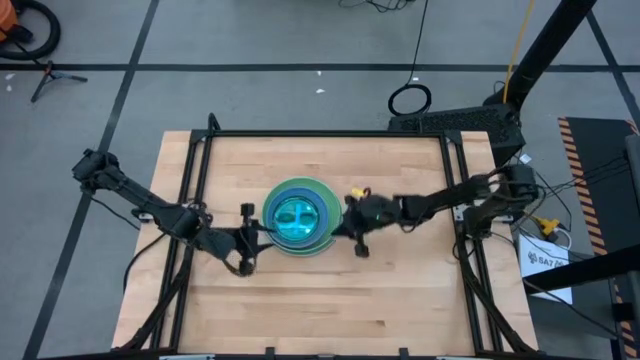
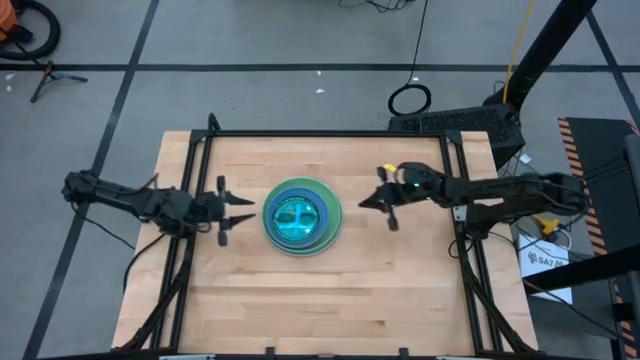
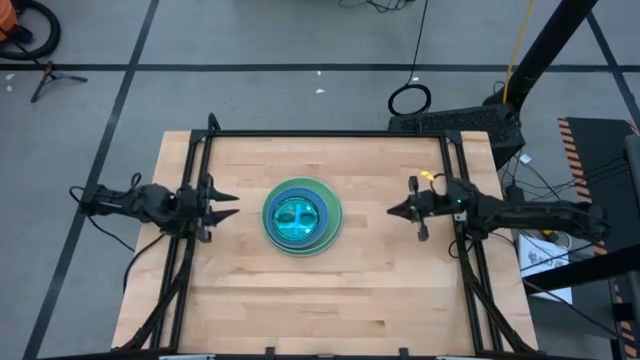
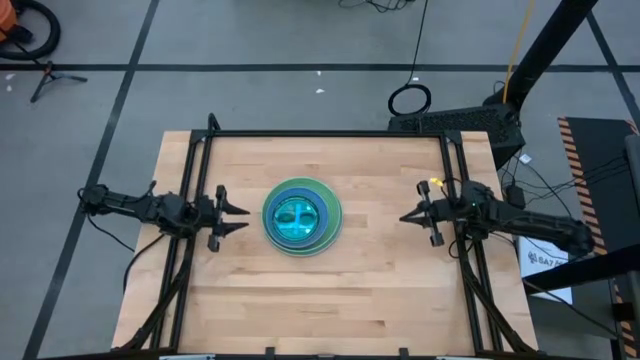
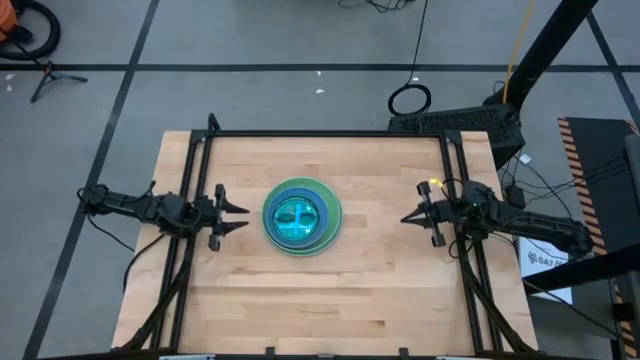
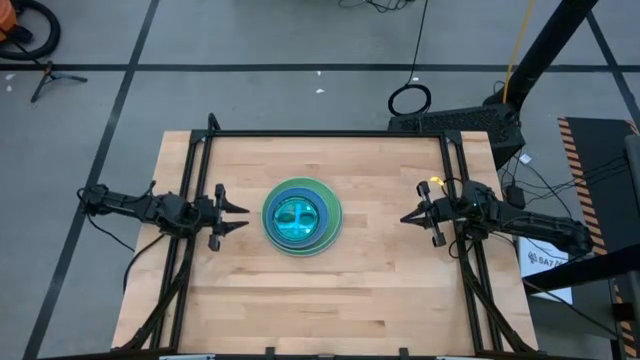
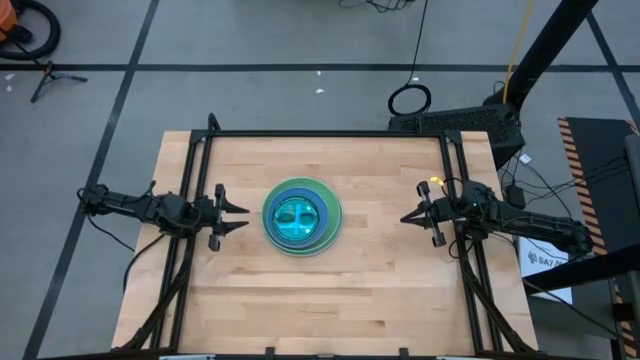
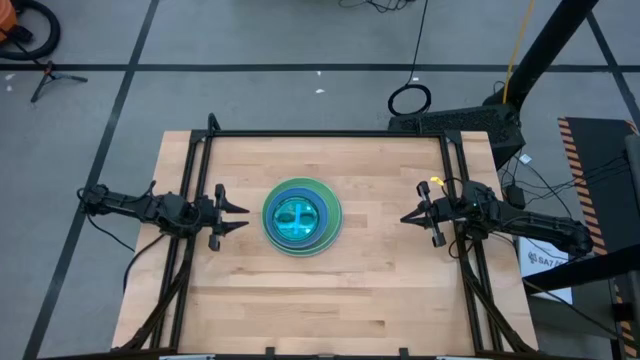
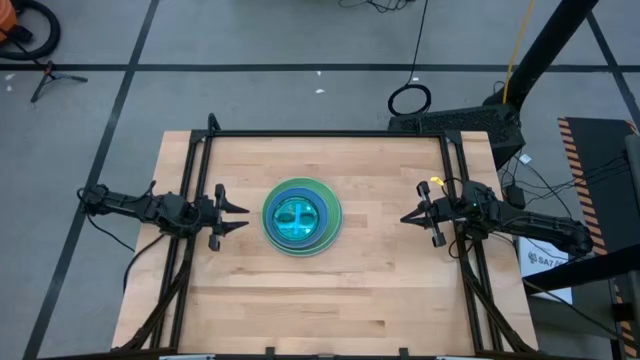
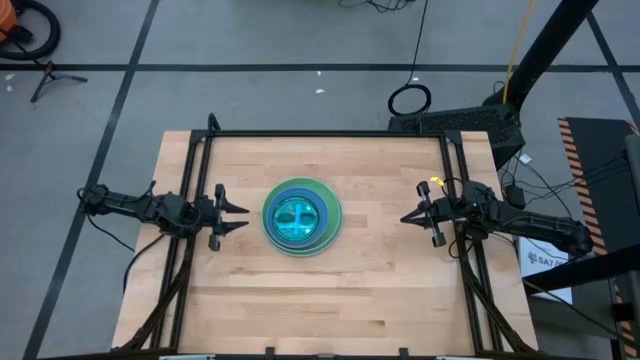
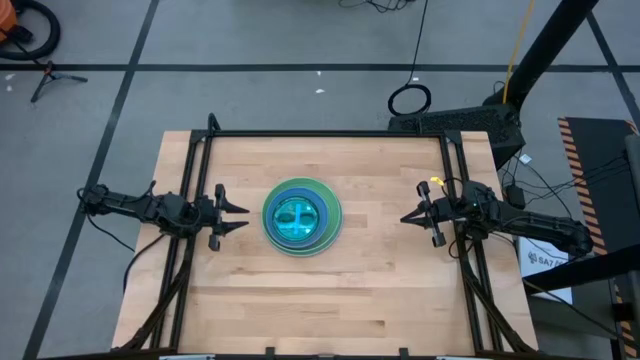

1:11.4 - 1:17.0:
Task: Stack plastic plates
Return to Home Position

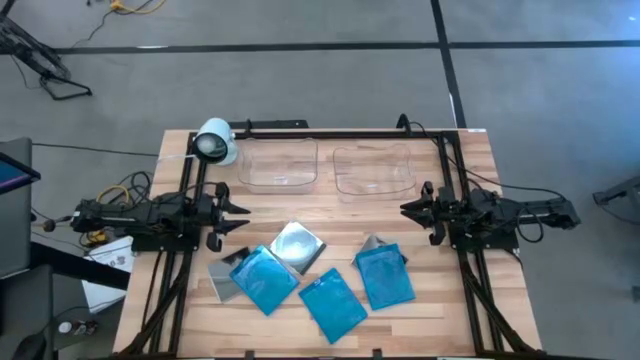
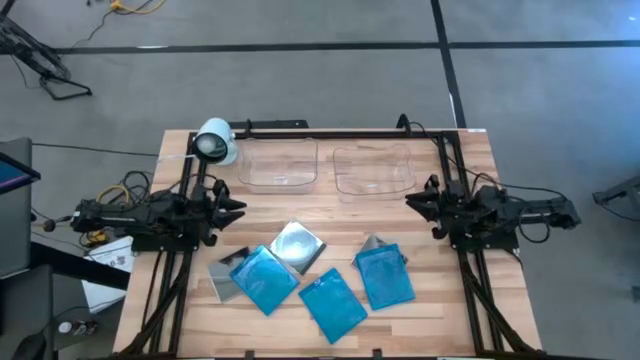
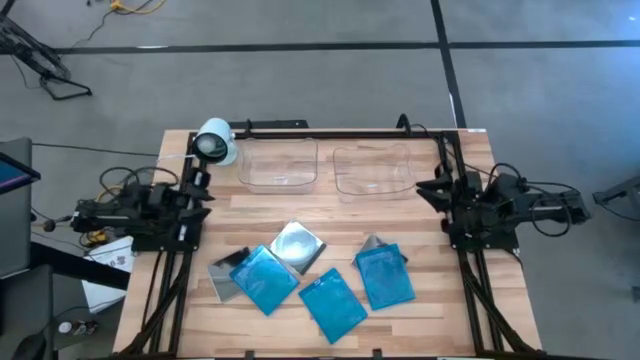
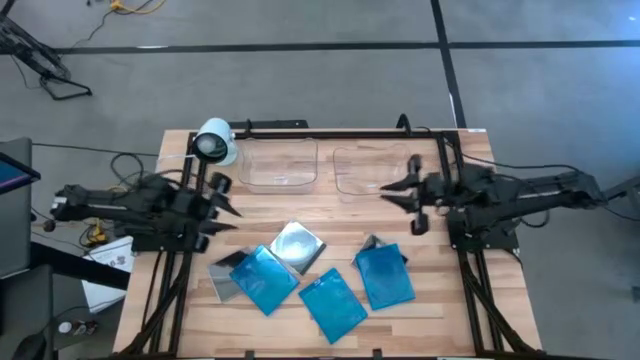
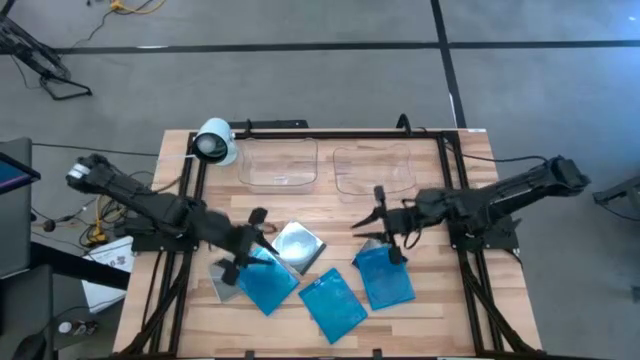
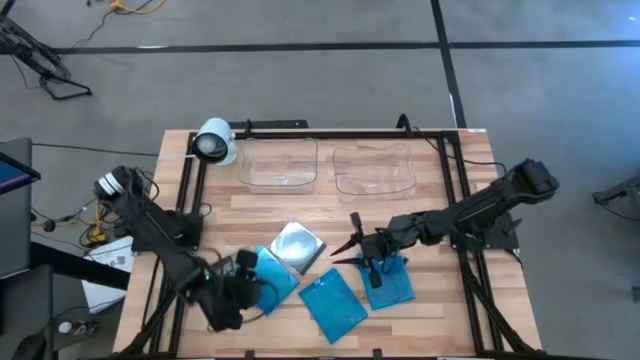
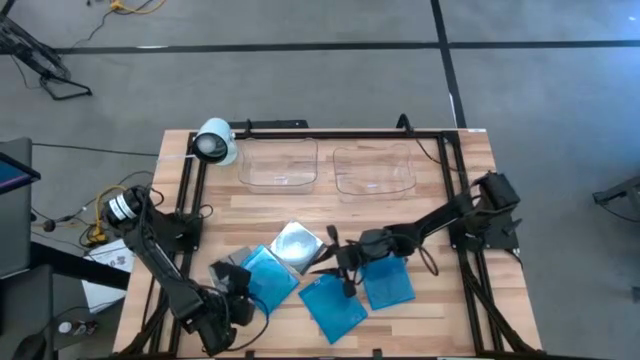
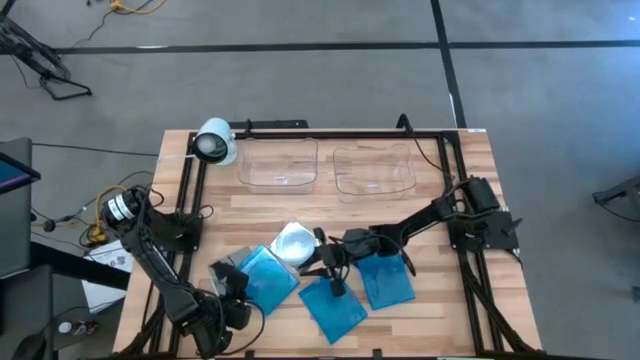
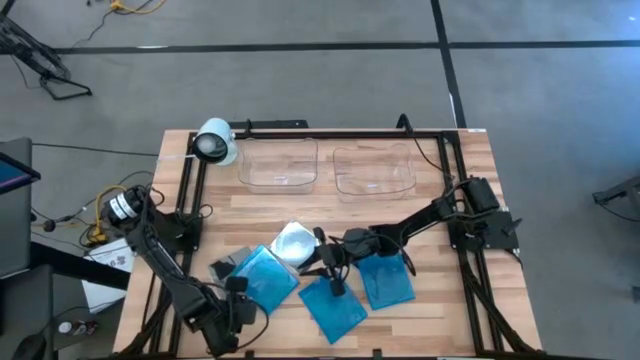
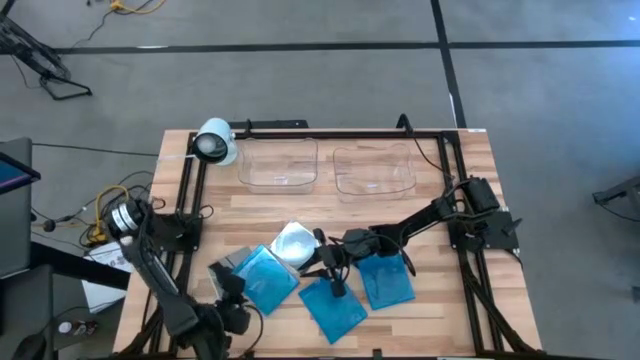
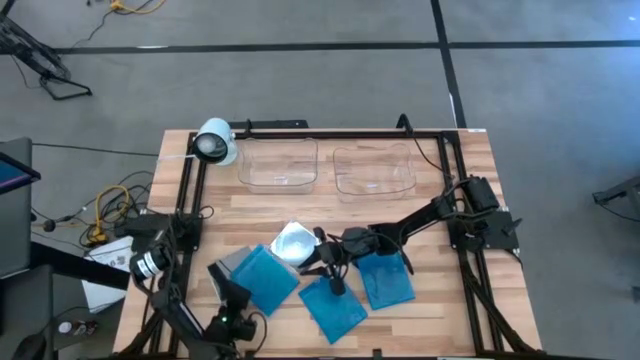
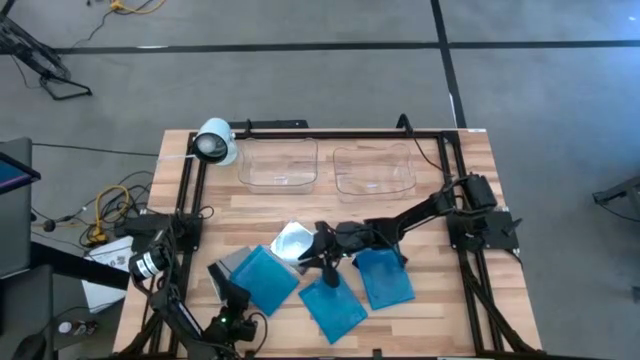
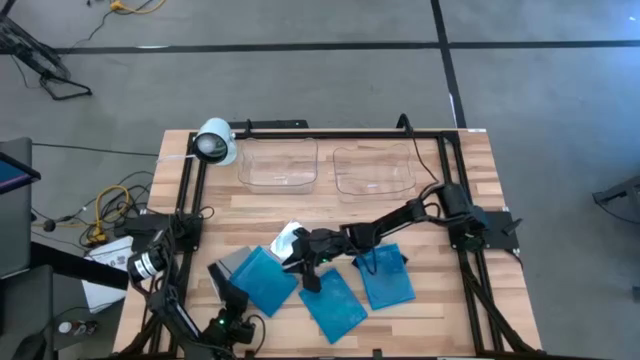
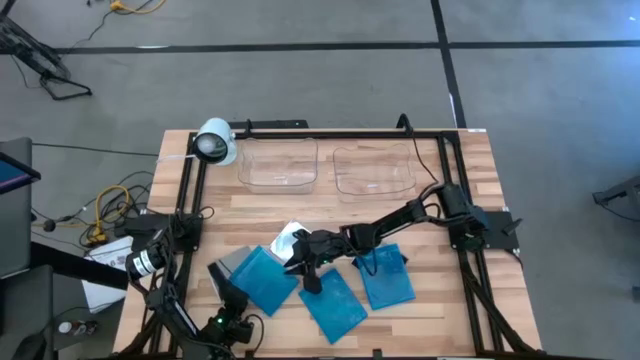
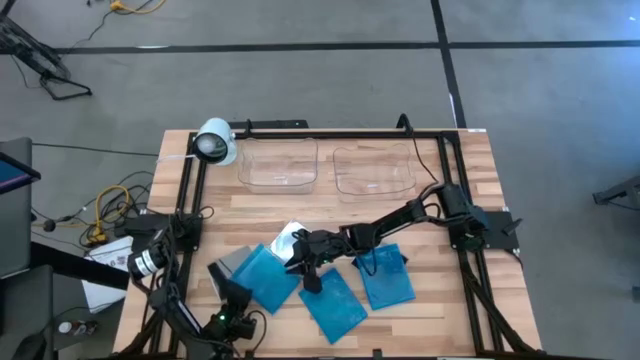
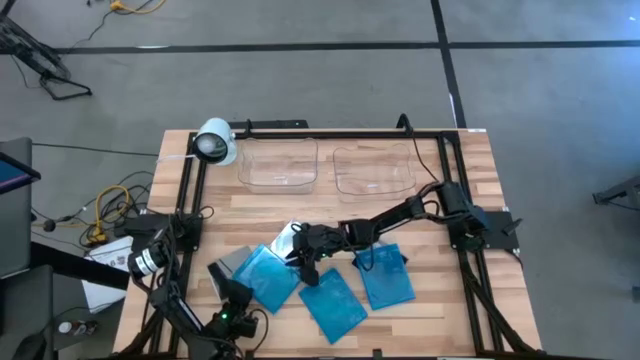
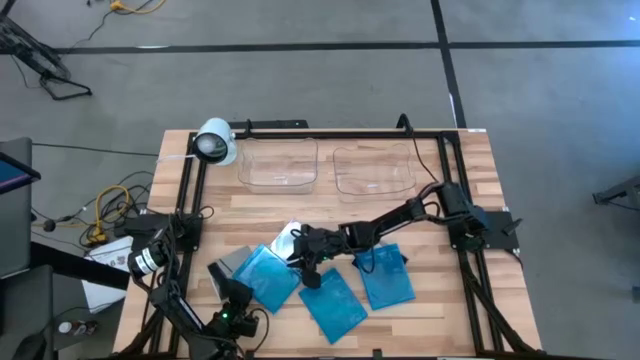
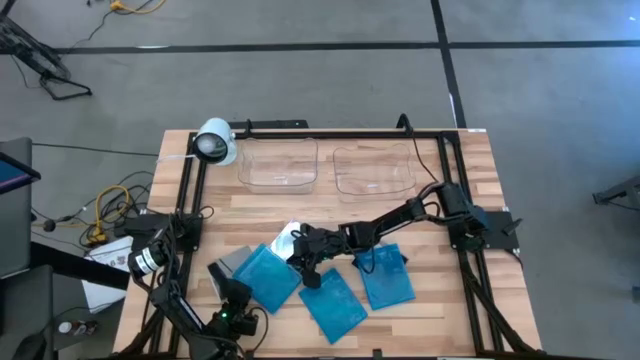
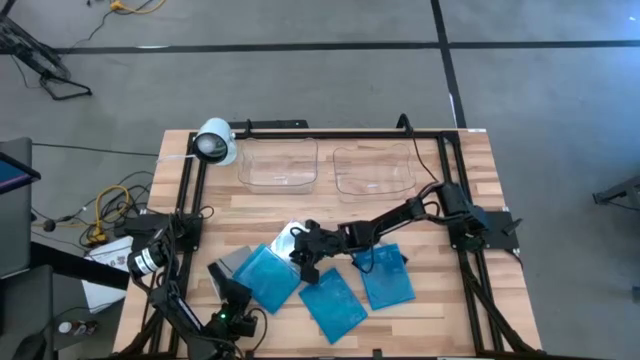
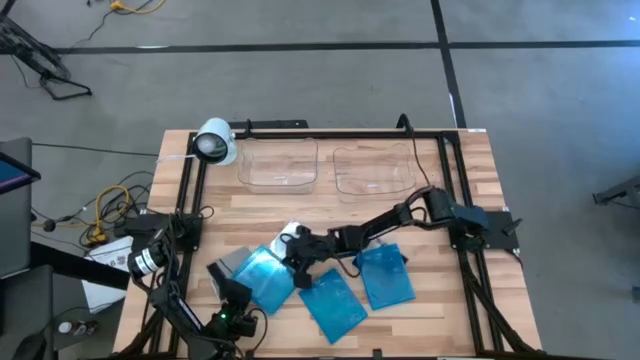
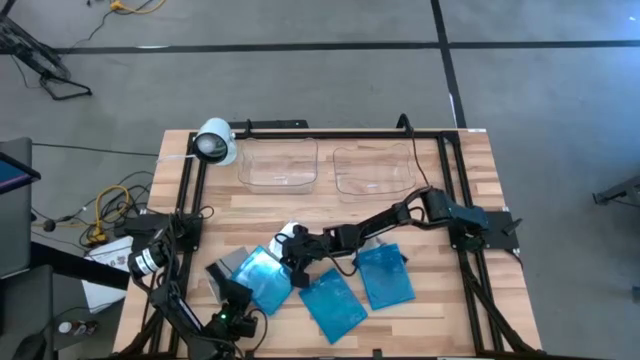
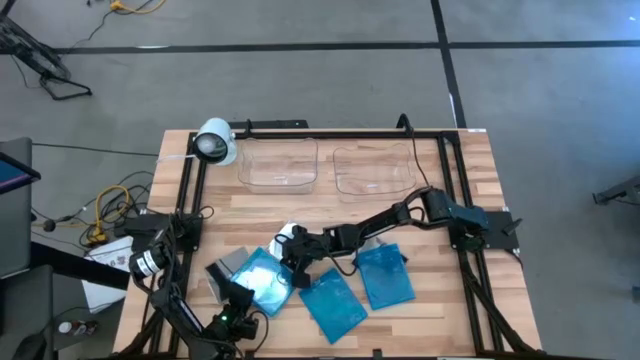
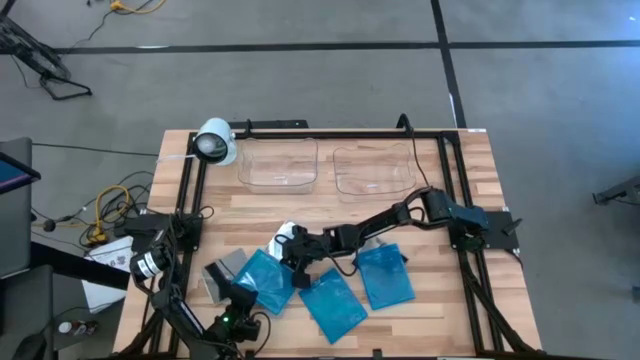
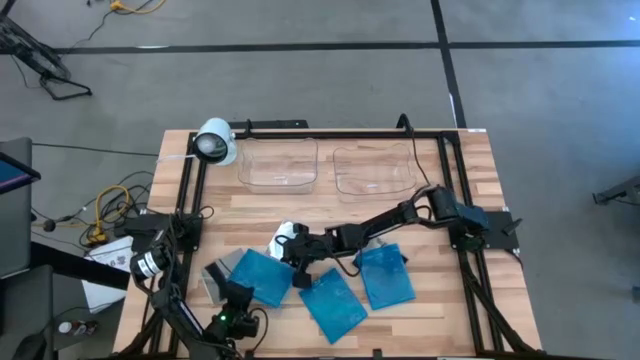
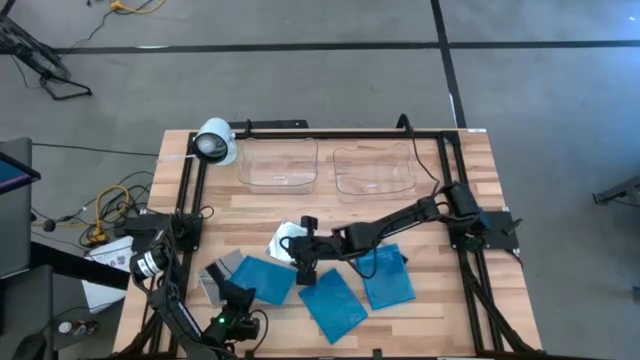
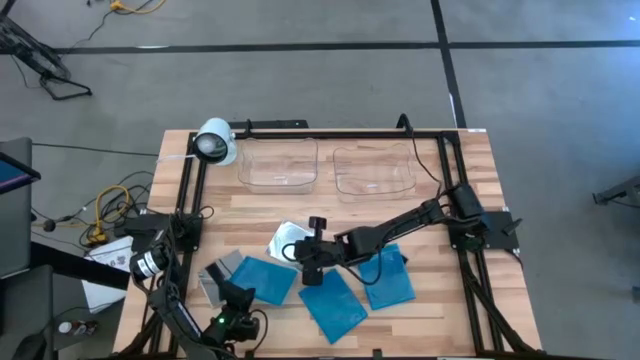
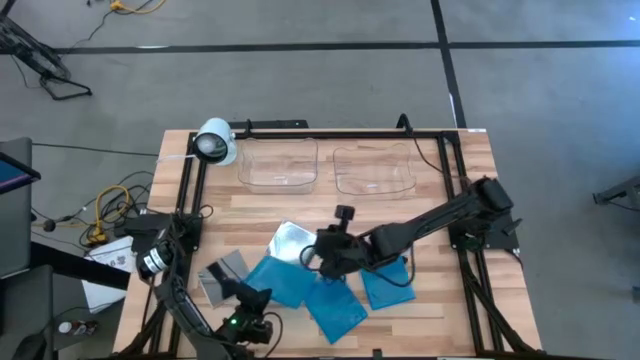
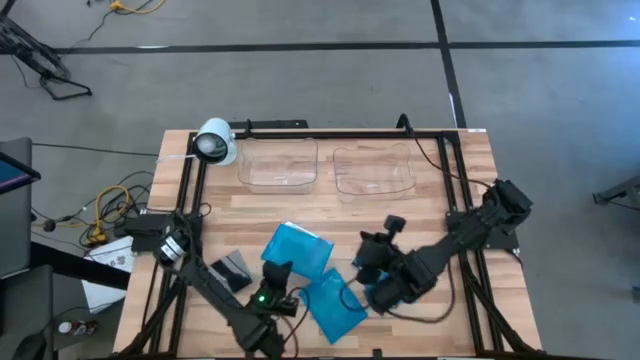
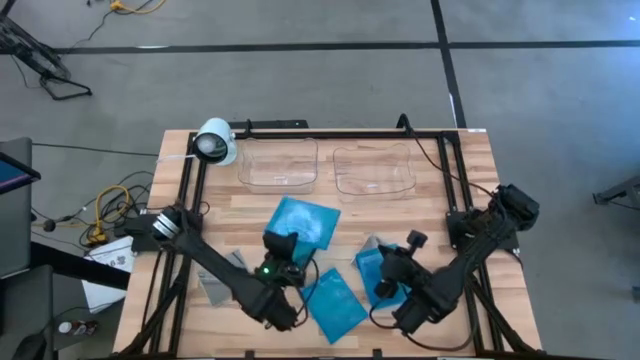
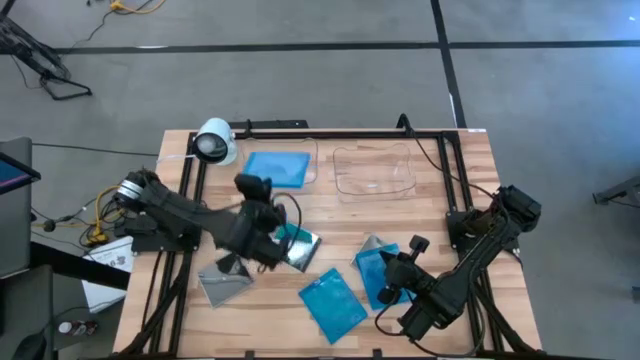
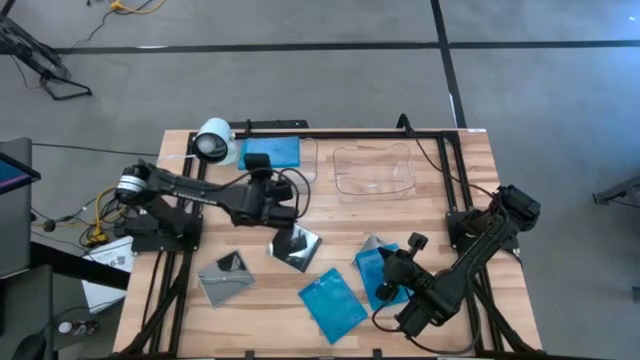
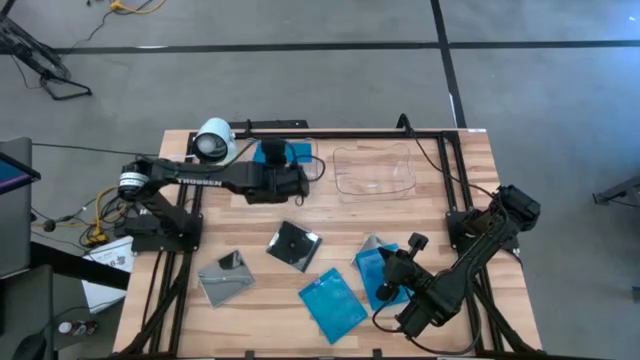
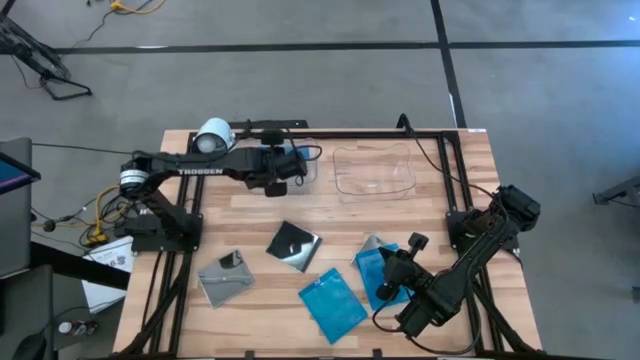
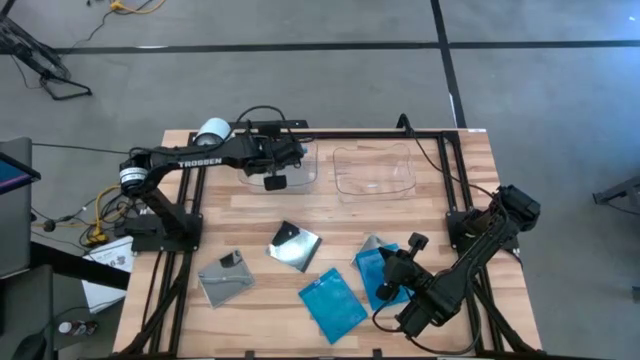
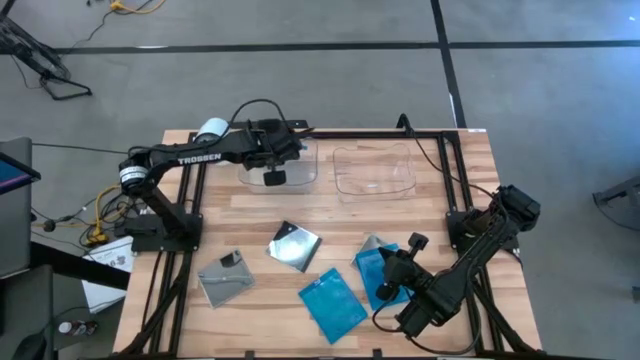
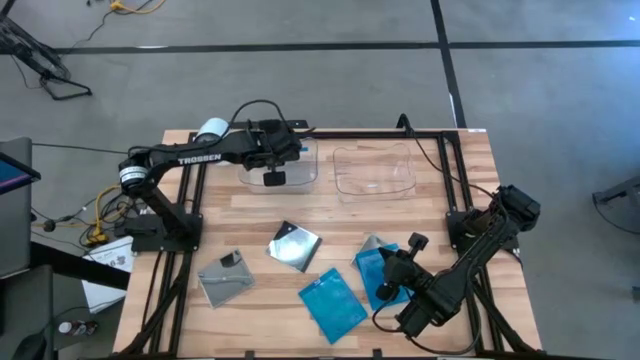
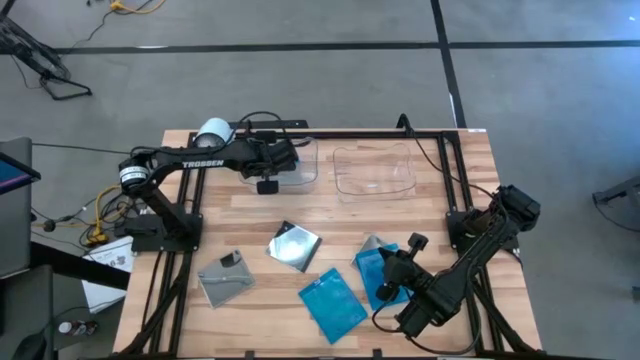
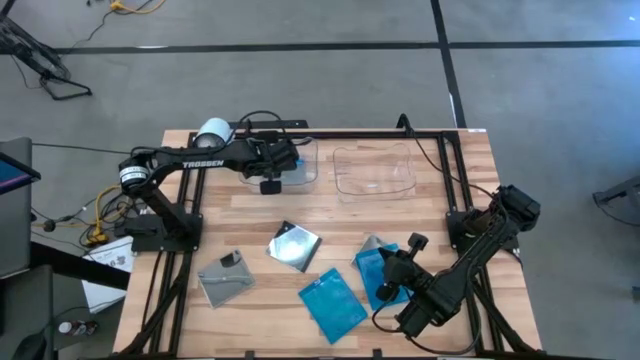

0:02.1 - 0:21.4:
Task: Pick & place jewel cases by type
Put the left blue cd case into the left transparent bin
